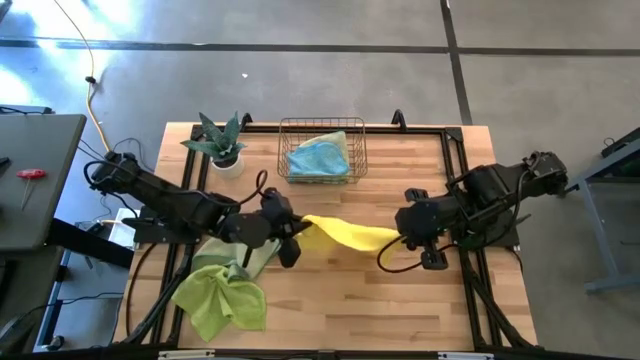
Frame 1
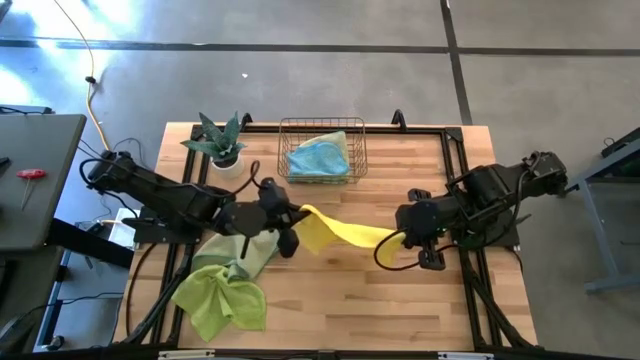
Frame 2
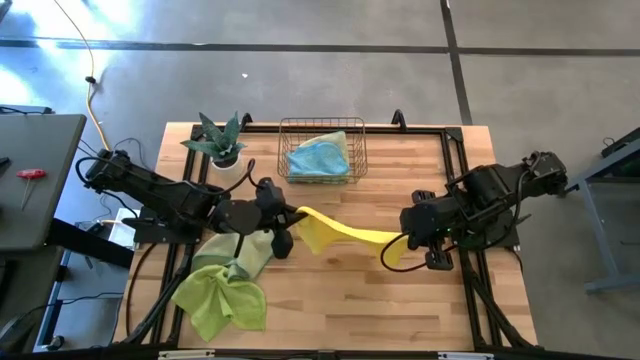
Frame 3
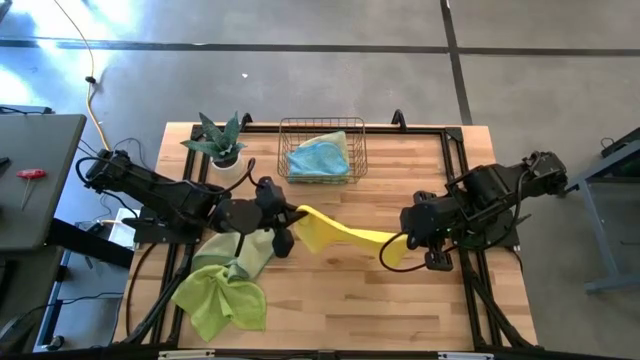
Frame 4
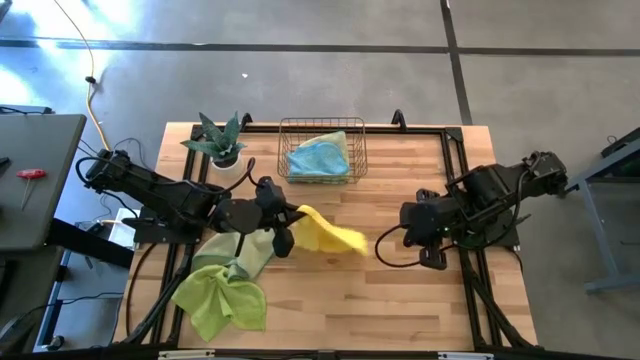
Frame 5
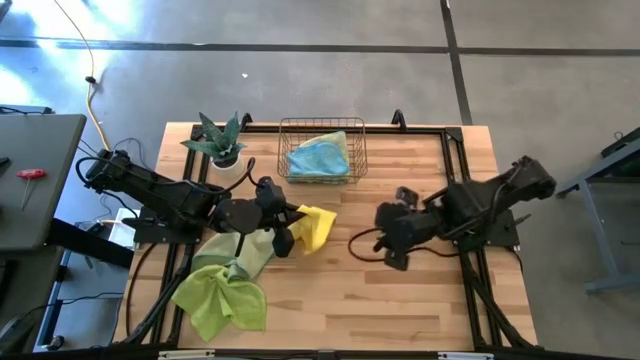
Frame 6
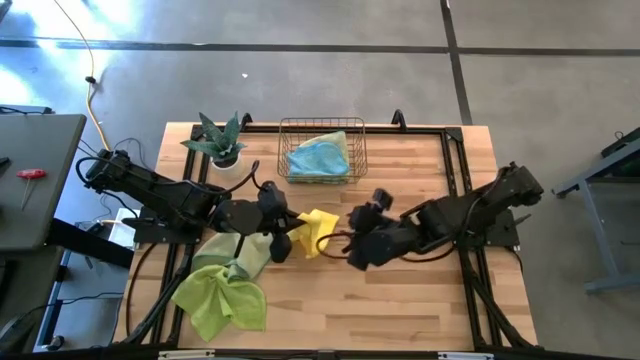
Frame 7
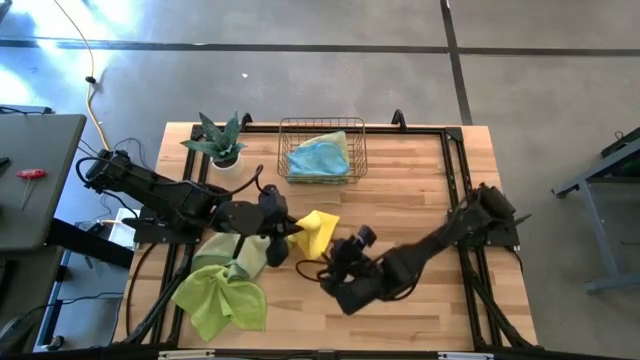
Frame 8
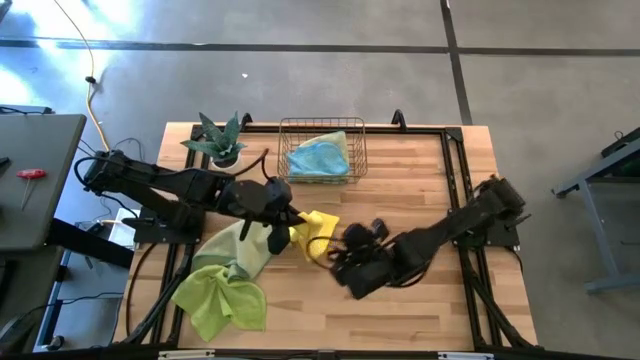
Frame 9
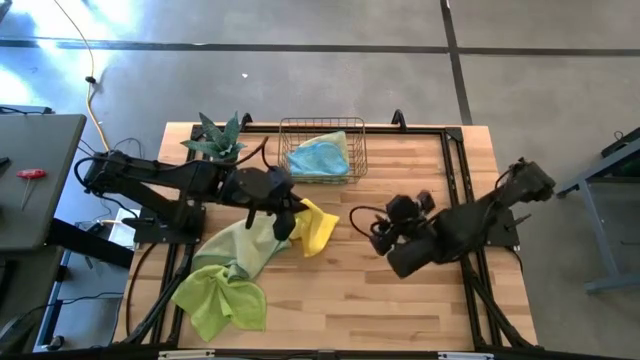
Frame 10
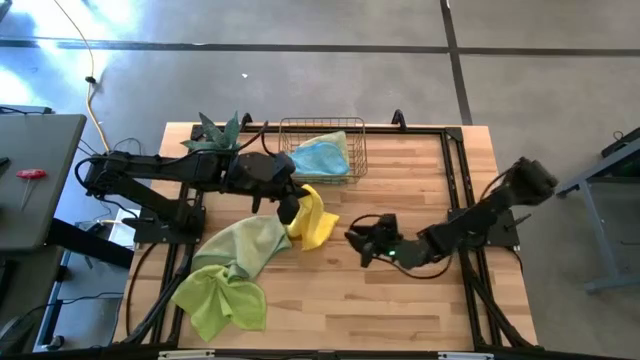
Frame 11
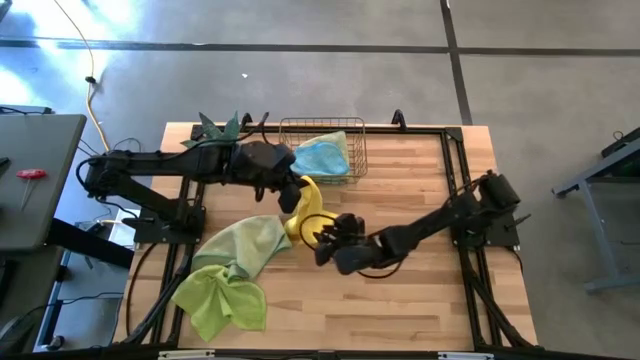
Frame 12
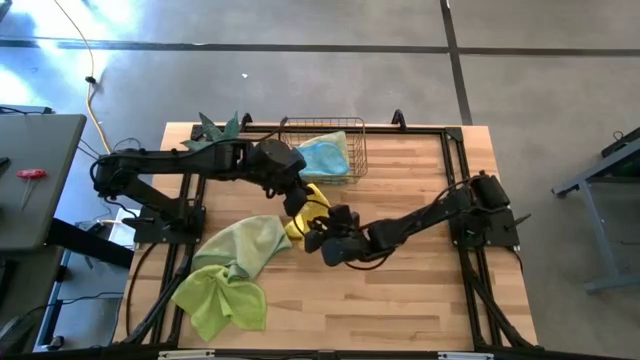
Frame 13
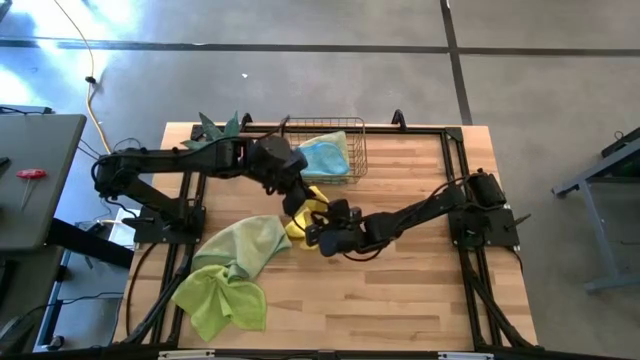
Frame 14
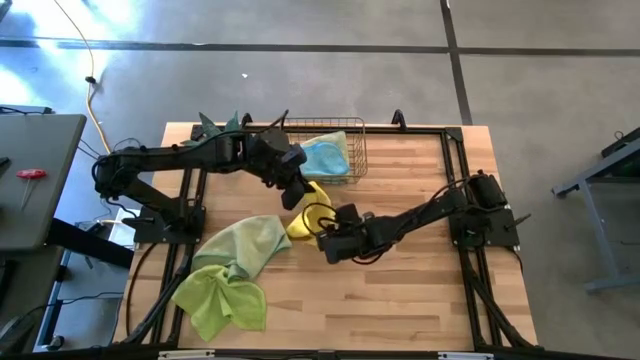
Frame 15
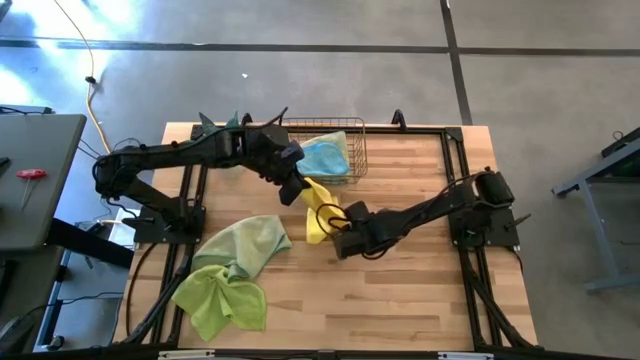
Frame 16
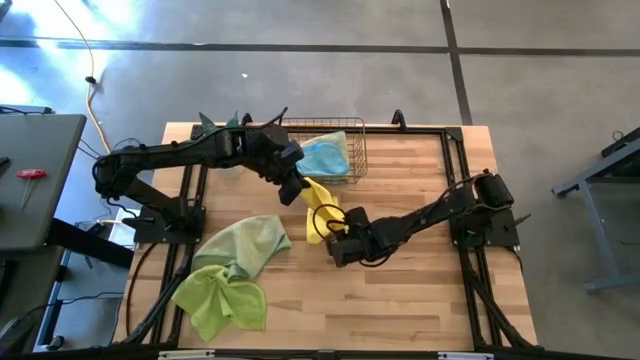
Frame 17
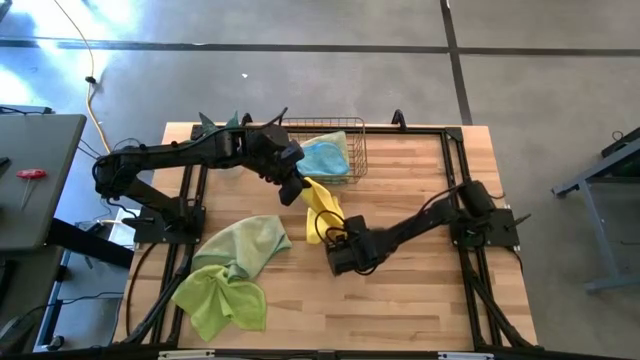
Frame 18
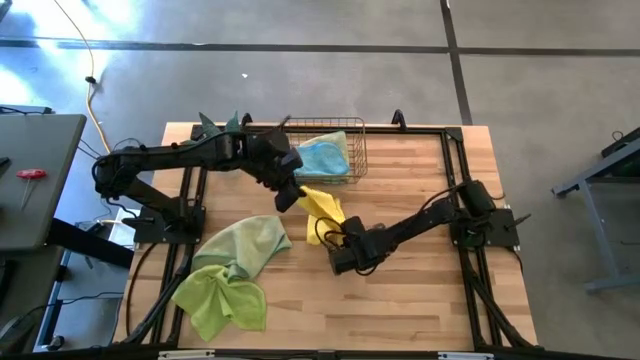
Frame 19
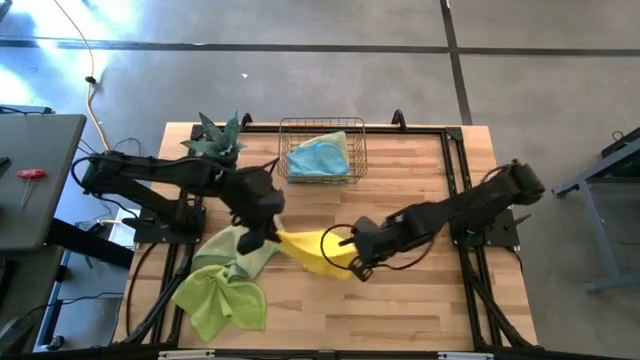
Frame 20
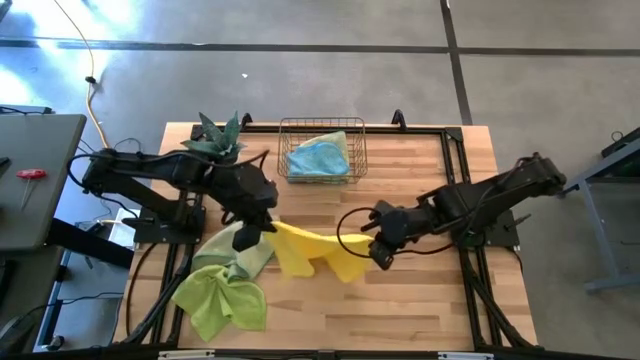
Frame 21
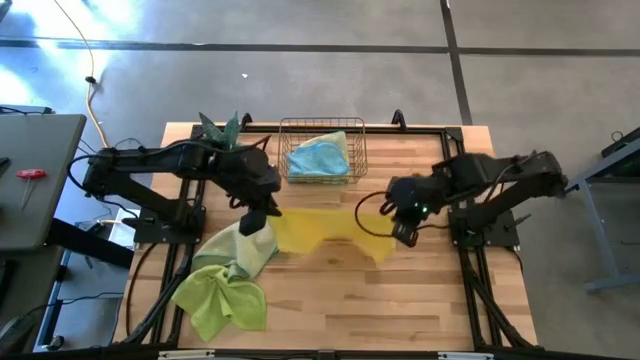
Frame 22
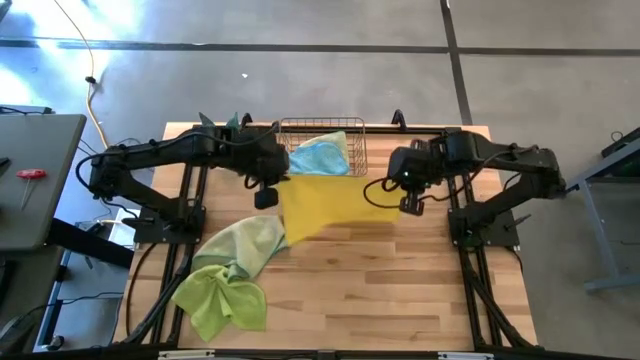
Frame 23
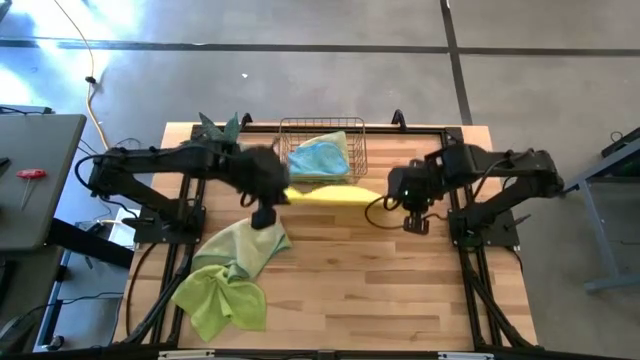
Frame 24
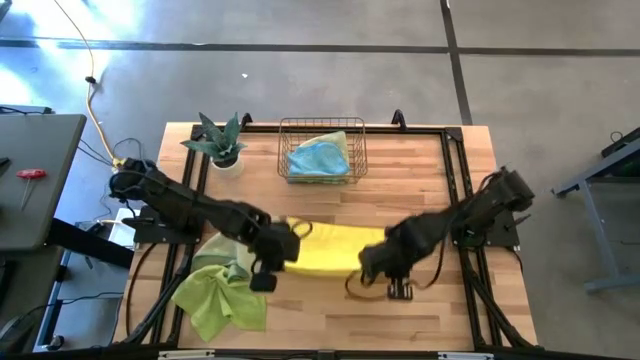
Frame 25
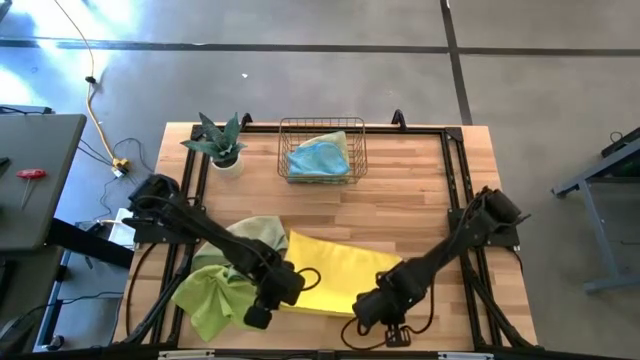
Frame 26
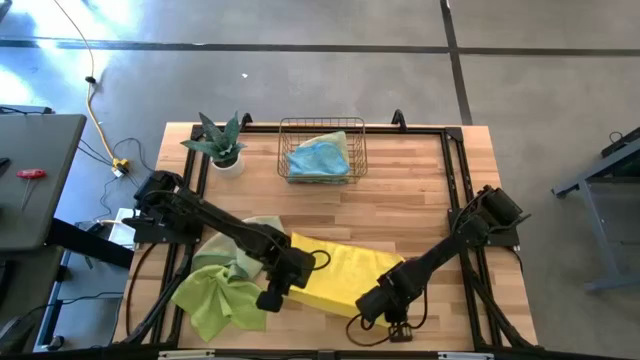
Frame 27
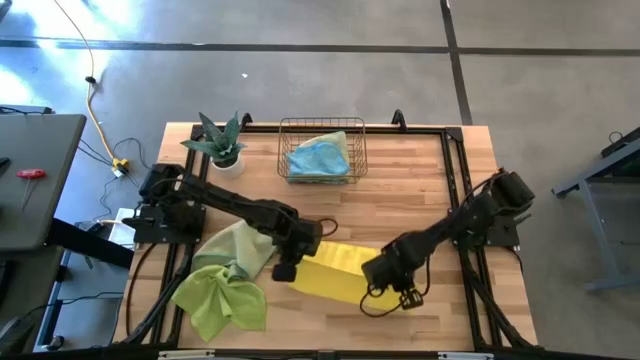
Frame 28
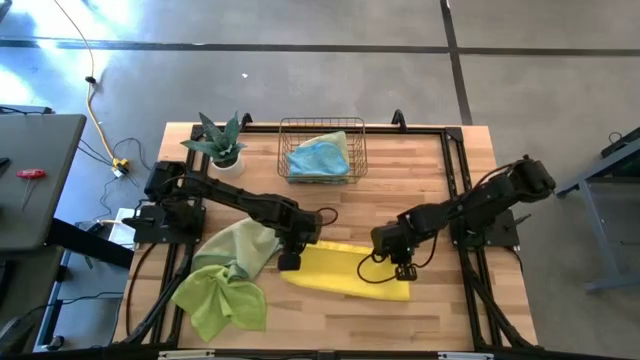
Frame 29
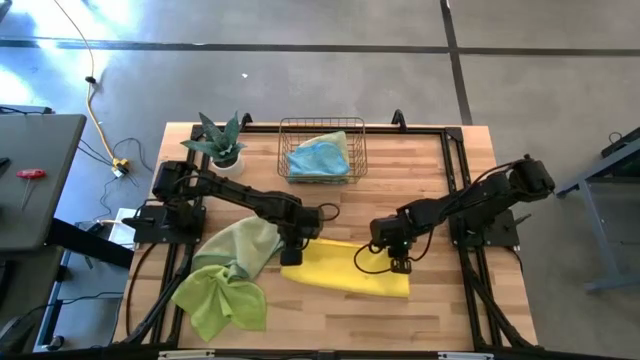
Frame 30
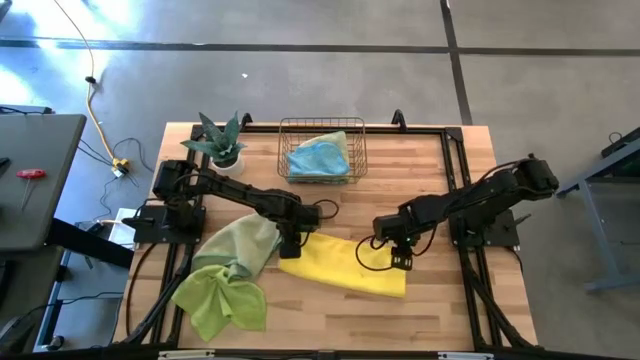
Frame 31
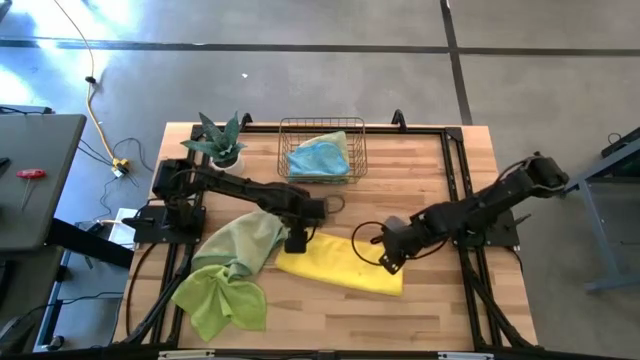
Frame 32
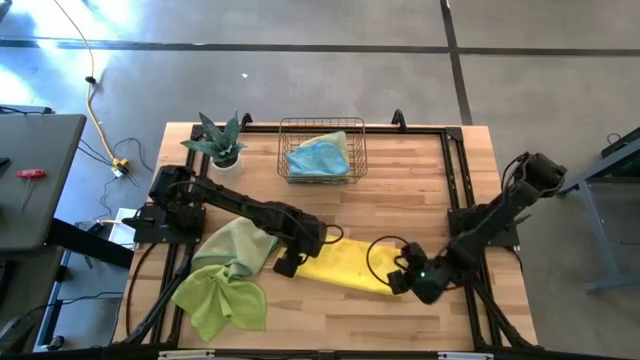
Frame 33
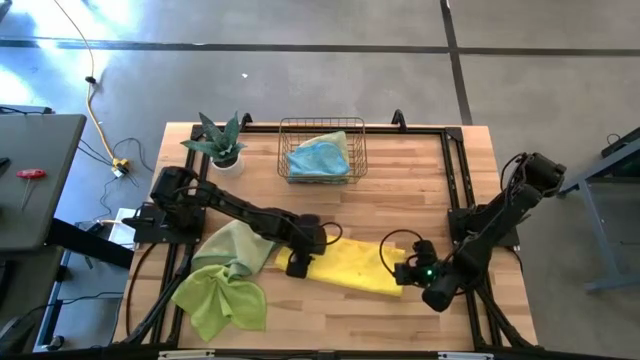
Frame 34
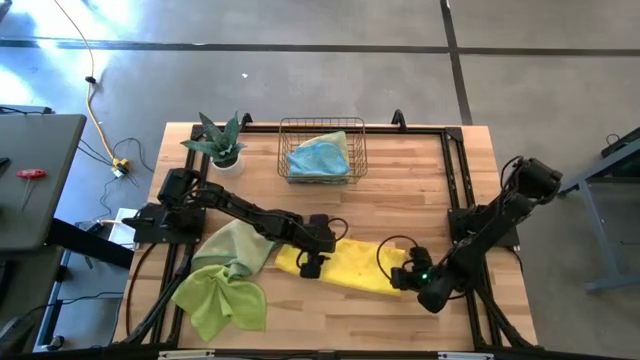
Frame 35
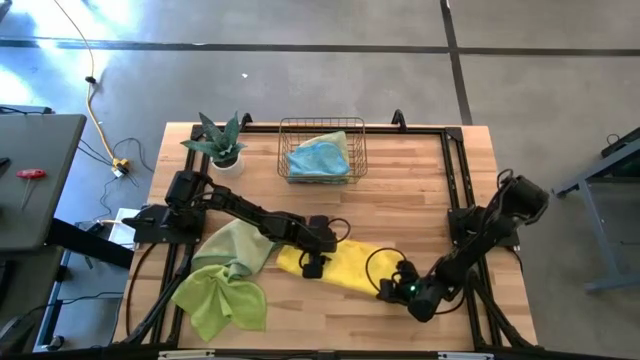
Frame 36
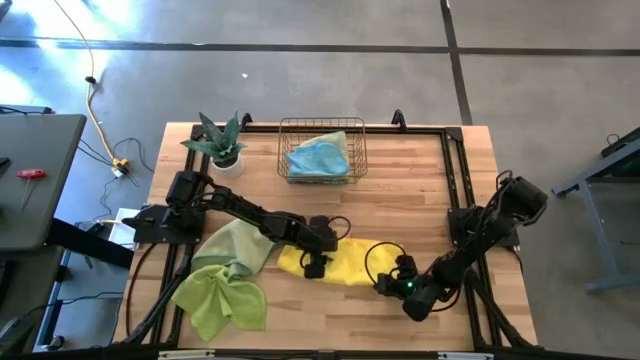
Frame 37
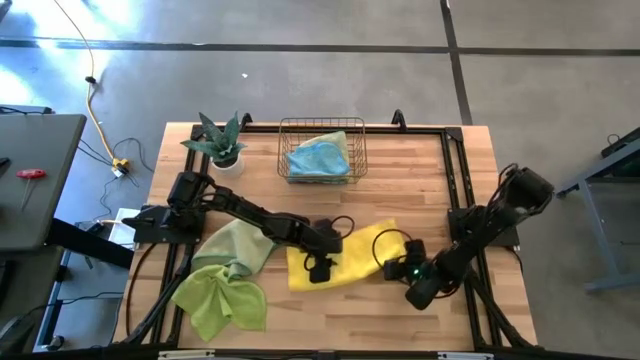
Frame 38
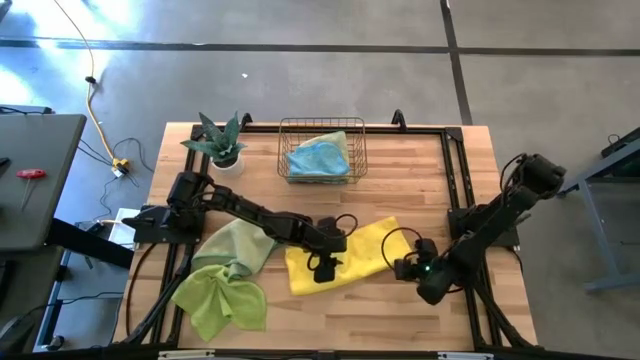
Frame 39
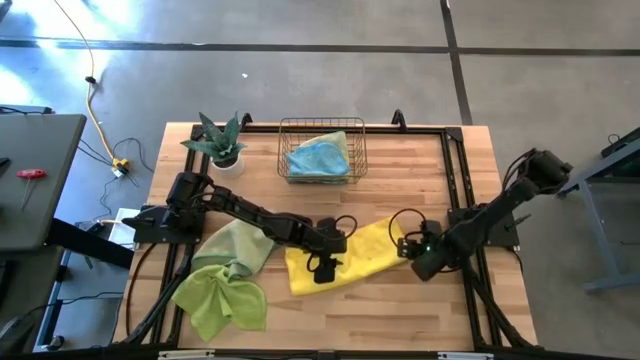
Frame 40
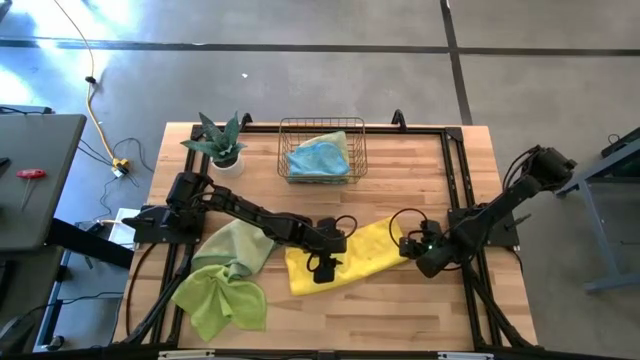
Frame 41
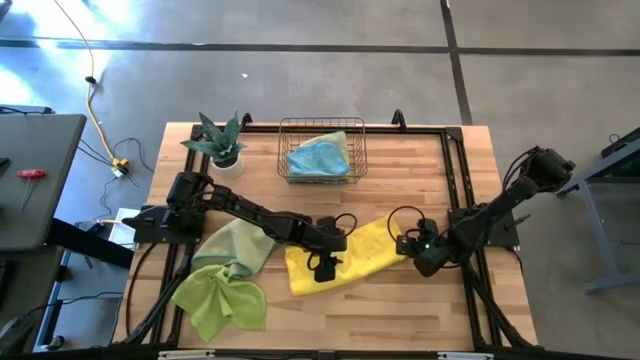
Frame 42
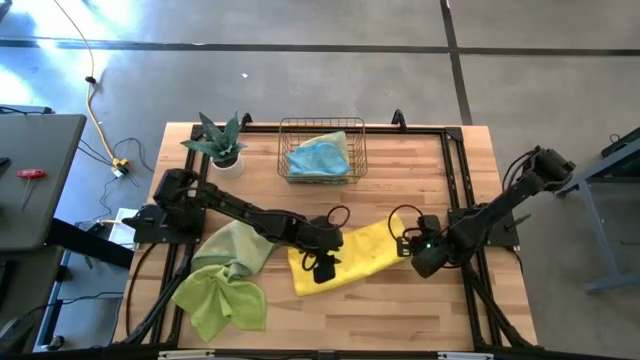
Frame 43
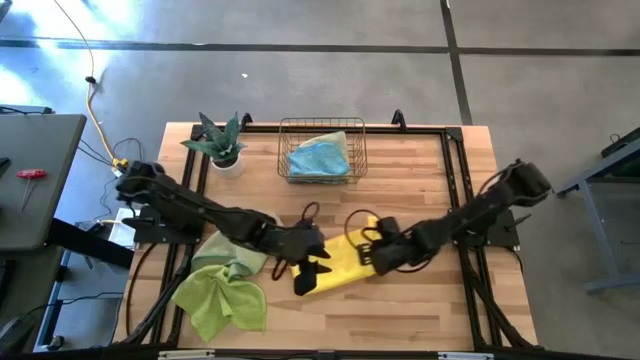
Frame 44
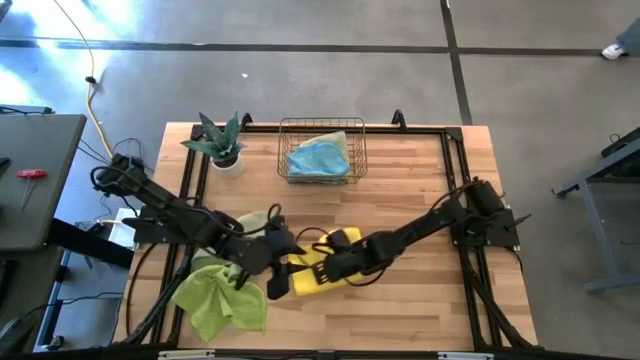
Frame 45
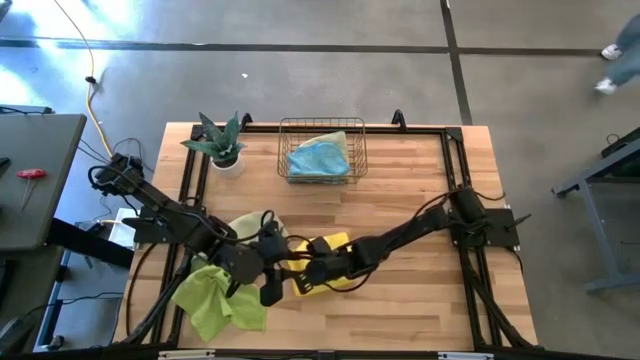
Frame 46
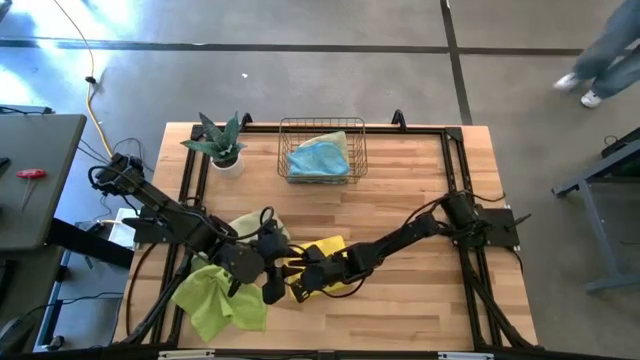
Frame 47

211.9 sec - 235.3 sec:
Task: Fold microfiber towels
Fold the yellow microfiber cloth
